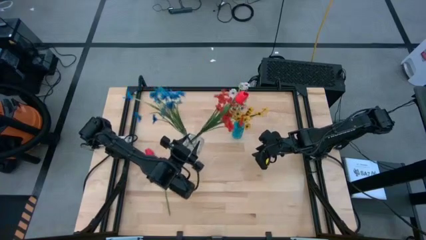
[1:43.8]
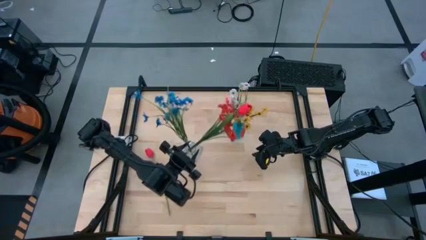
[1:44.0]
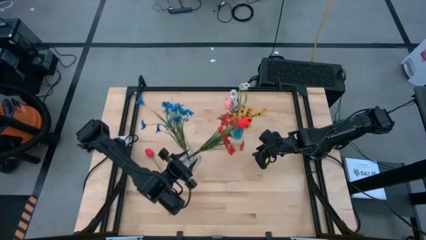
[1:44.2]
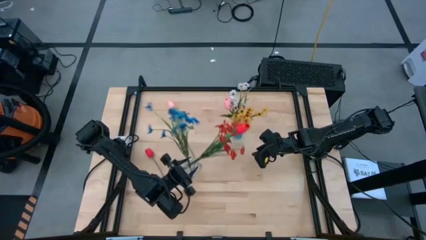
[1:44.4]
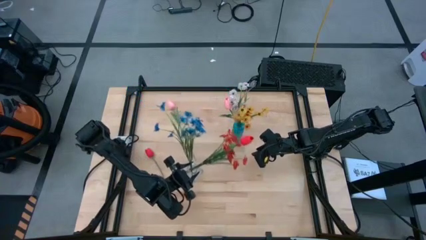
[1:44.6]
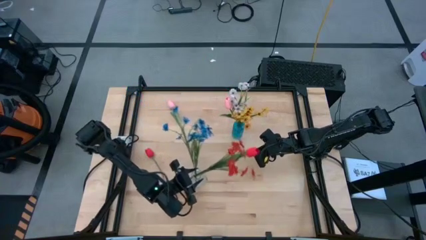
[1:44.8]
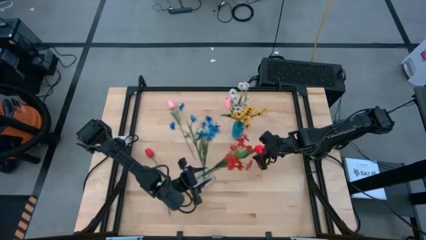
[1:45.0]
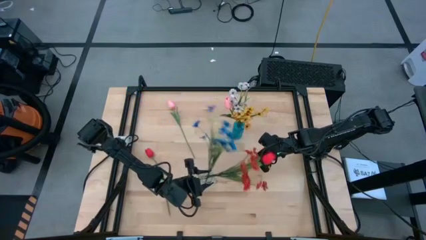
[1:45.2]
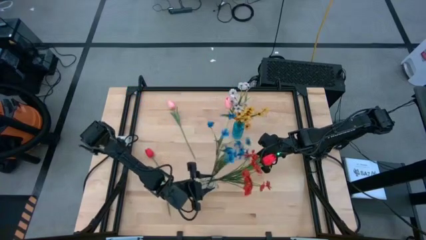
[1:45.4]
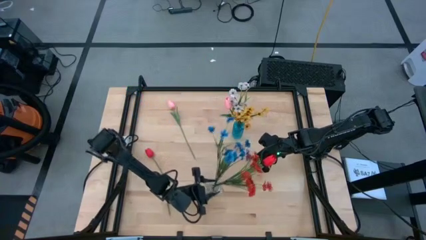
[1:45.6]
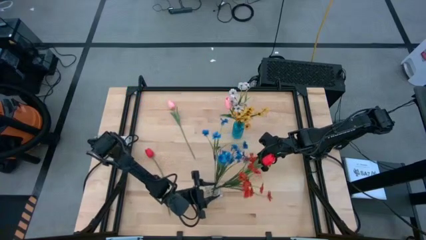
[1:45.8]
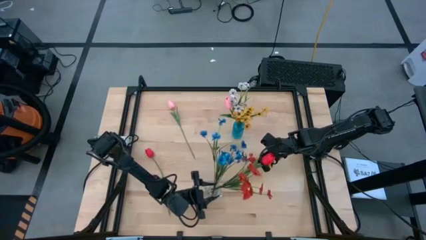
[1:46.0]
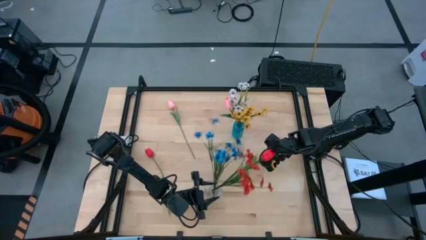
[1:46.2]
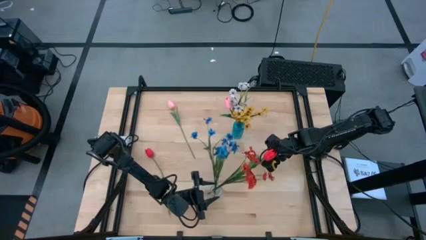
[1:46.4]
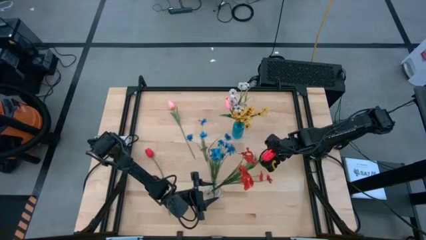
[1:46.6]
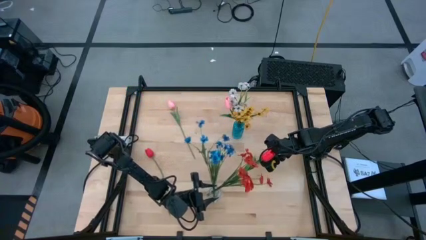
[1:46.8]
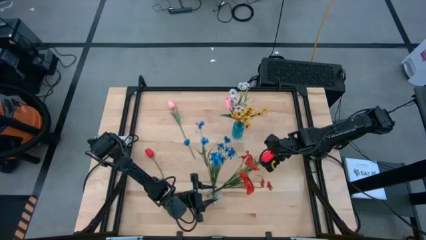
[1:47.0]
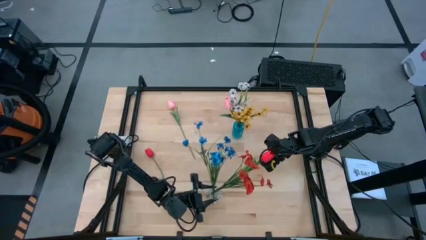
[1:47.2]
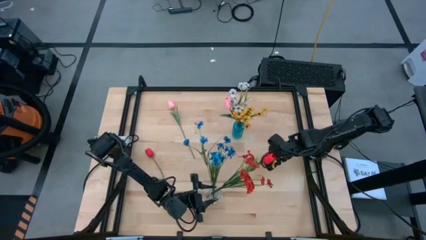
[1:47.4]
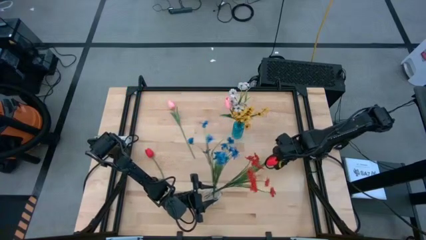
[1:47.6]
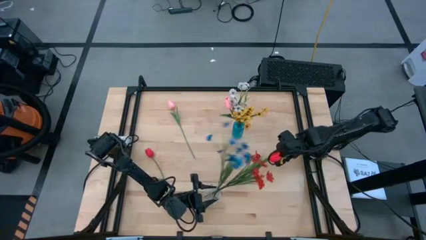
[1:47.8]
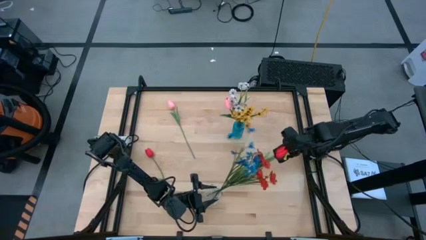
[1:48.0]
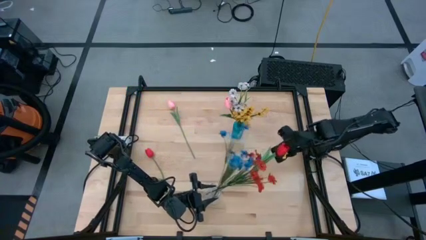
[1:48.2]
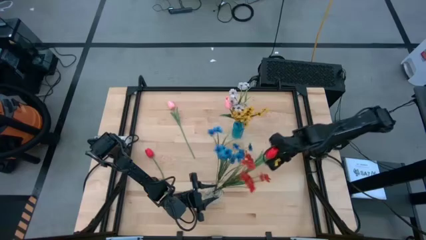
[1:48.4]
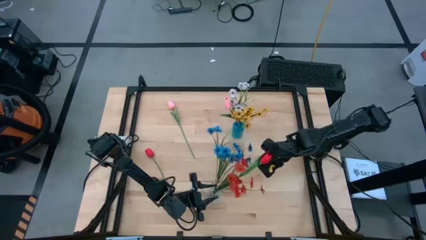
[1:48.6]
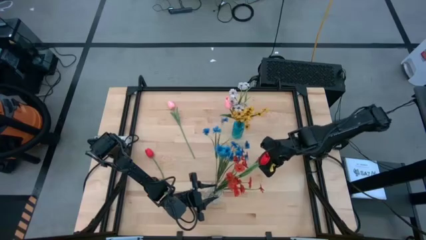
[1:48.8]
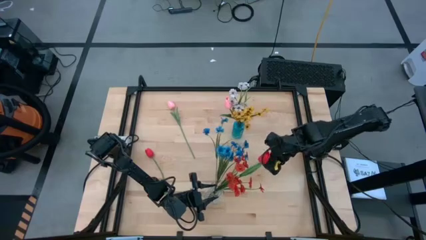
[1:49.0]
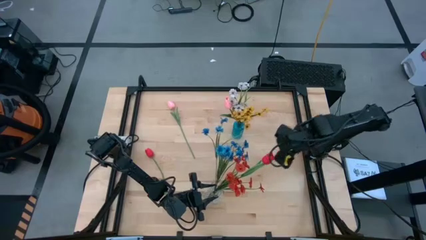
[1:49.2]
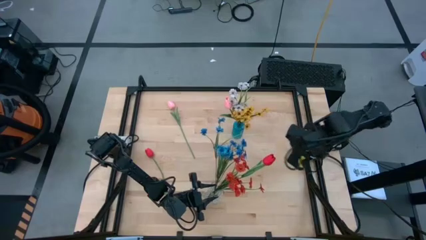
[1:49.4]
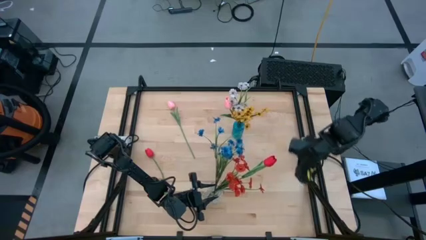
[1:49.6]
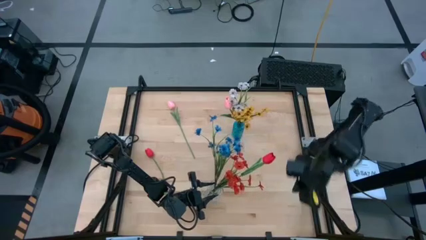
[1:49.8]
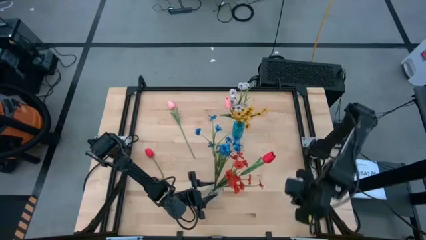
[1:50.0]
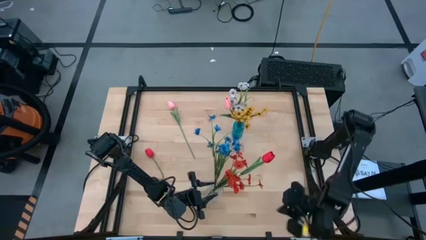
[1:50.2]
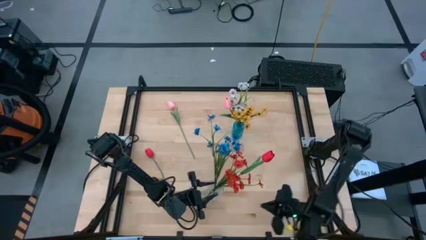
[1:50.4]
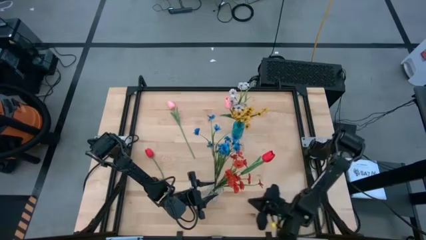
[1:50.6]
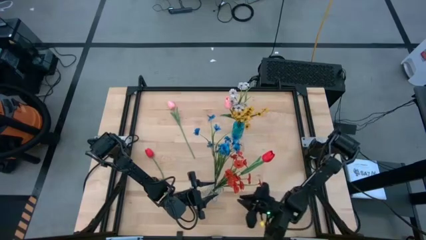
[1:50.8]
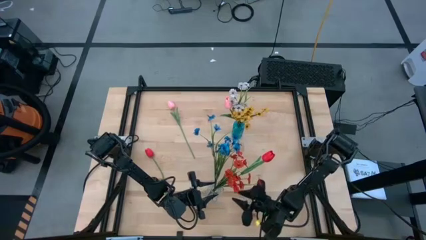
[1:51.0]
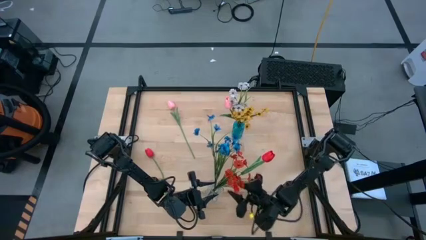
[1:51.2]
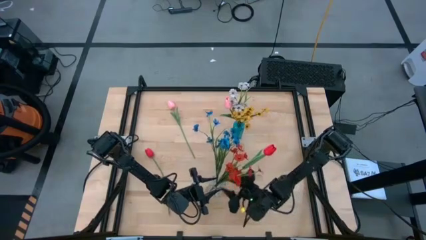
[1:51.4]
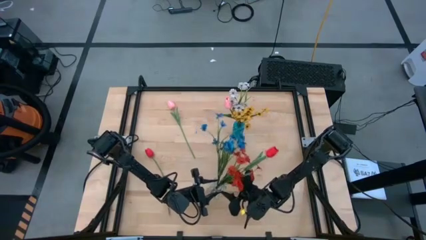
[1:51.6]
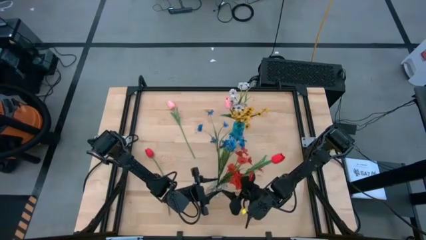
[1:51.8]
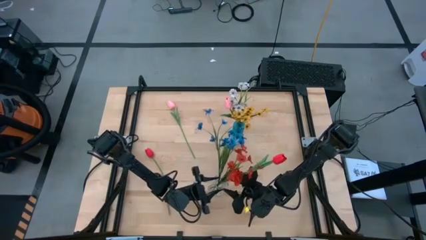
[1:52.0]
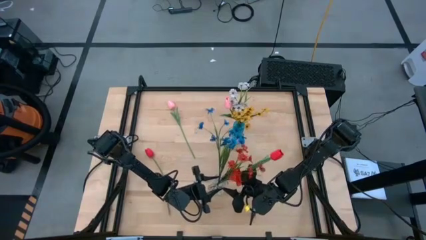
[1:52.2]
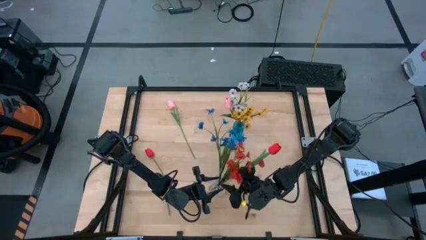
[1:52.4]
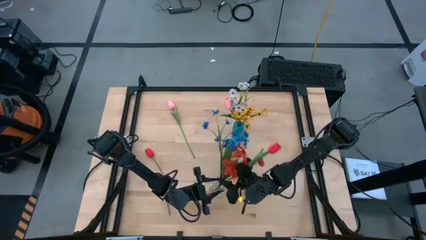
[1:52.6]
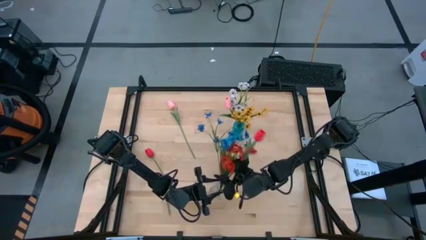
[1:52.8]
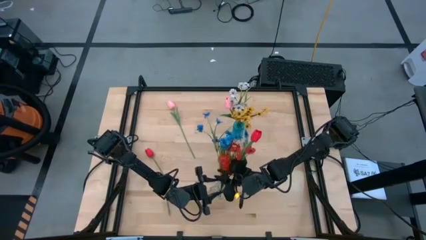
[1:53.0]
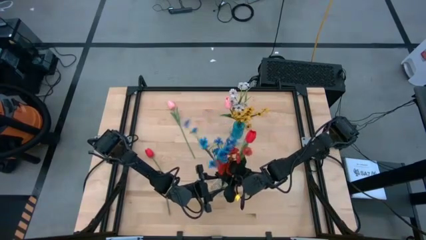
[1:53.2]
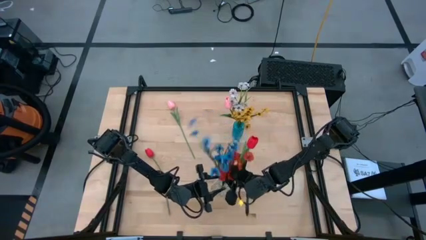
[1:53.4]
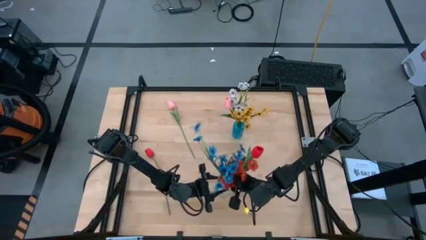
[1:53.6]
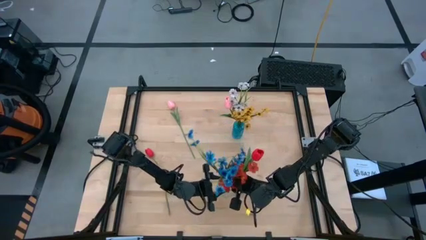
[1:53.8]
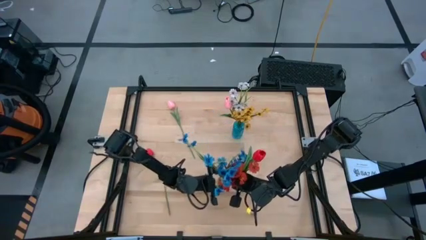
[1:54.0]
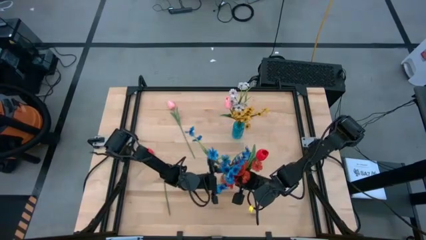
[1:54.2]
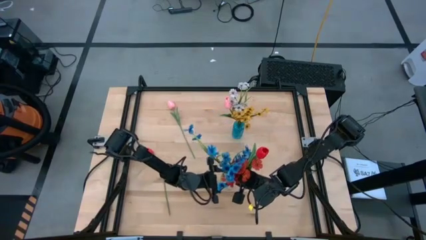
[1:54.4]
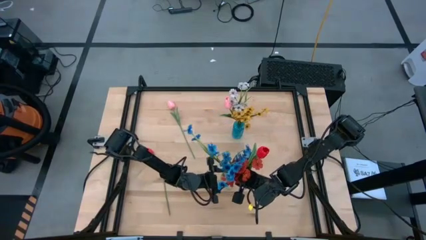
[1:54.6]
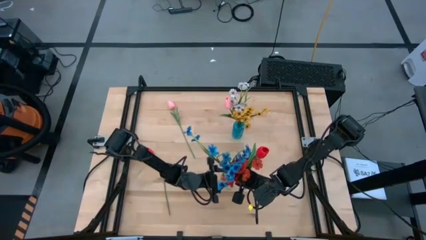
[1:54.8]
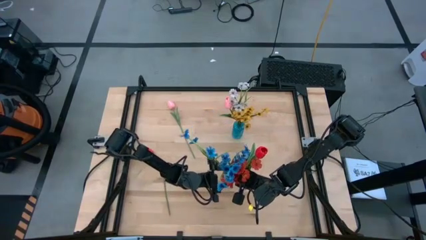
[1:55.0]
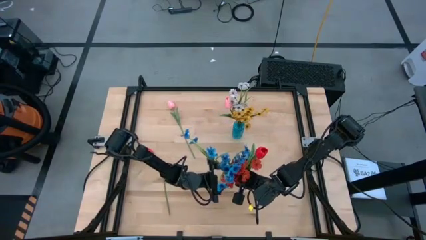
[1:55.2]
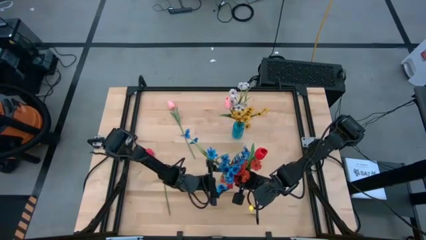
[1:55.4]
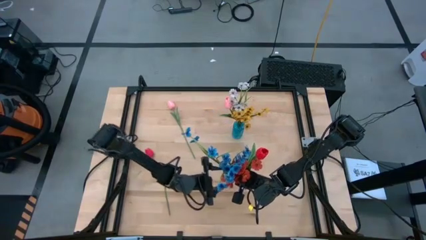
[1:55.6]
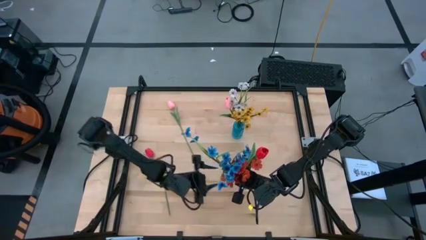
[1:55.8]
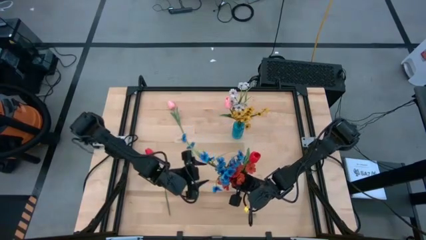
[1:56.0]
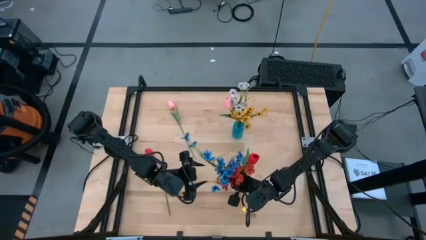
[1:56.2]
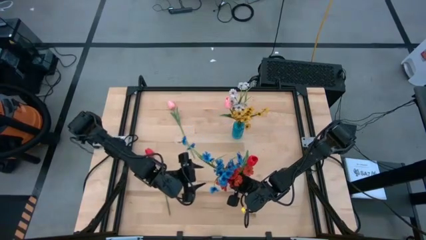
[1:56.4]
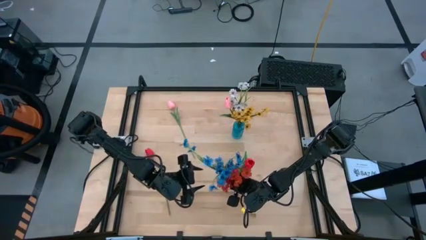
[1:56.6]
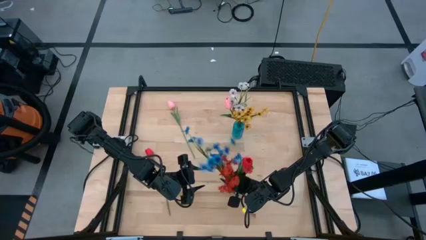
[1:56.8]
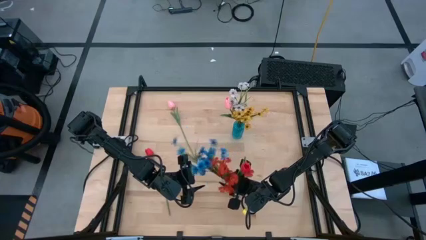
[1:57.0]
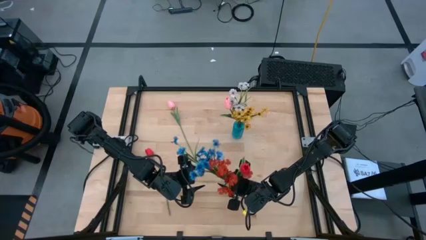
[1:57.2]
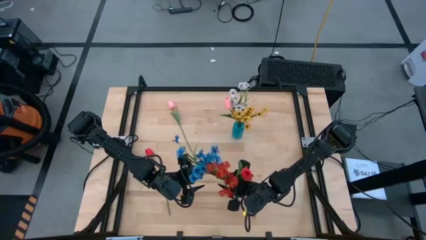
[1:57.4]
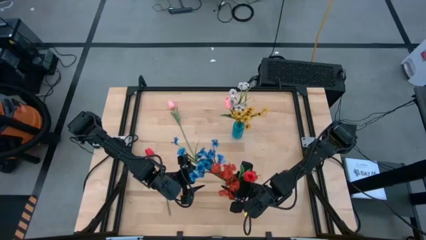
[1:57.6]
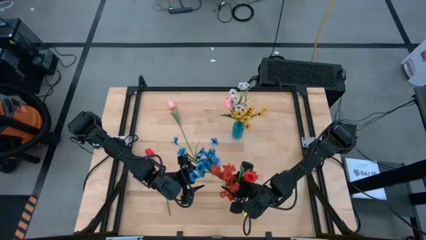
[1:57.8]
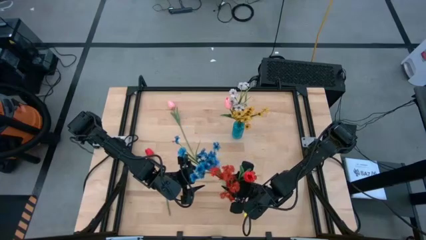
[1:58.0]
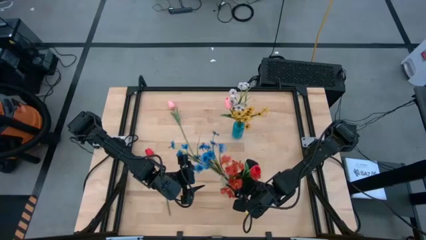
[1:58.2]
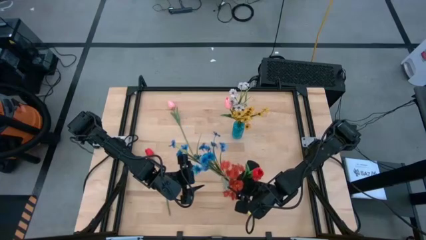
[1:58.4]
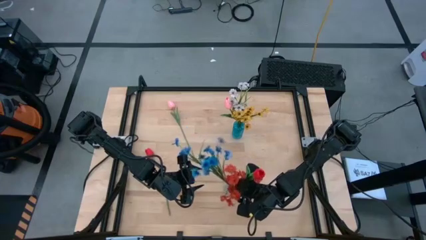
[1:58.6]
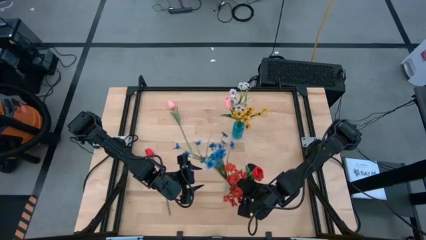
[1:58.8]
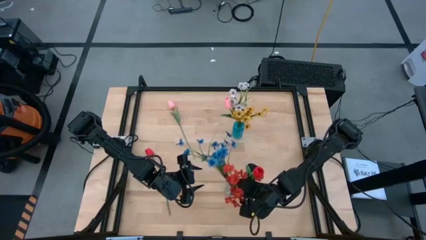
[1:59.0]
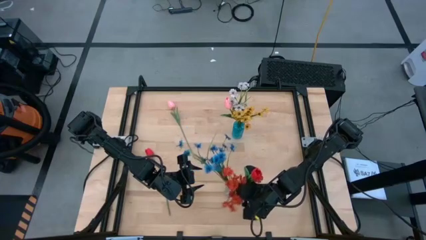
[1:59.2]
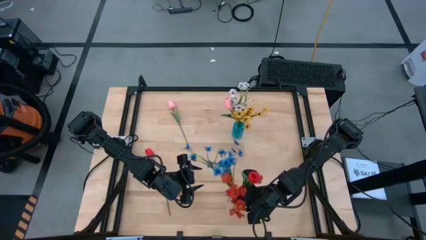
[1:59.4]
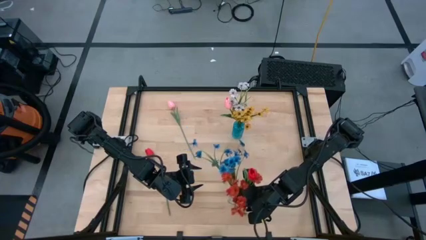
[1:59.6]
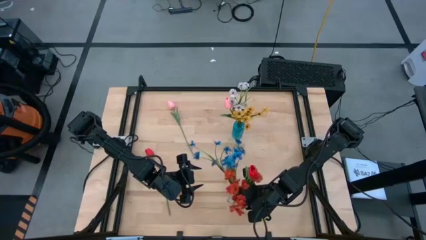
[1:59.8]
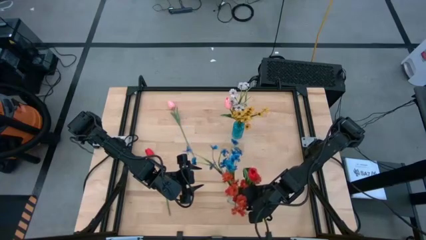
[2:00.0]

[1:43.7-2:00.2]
Task: Sort flowers into vase by color
Adjust the transparent vase
